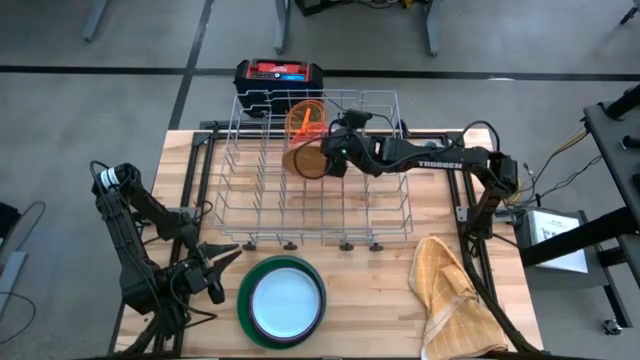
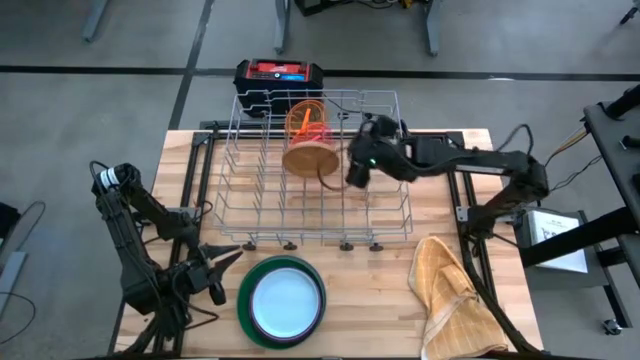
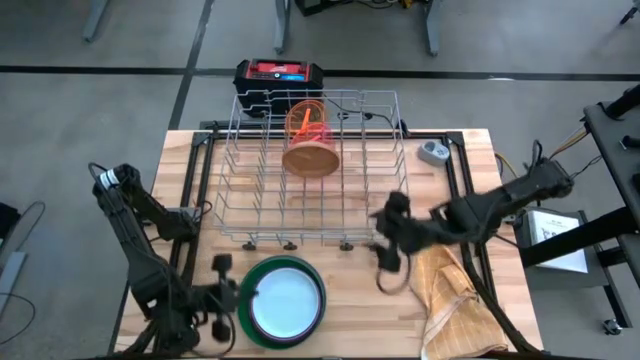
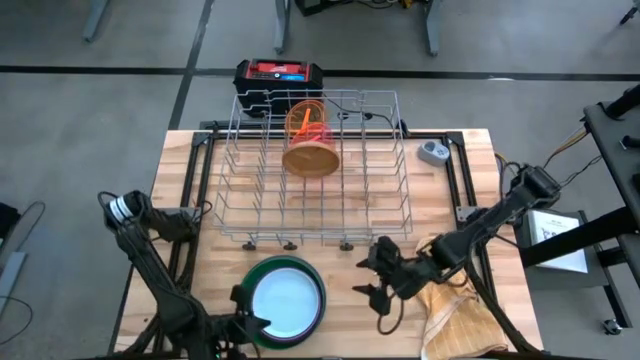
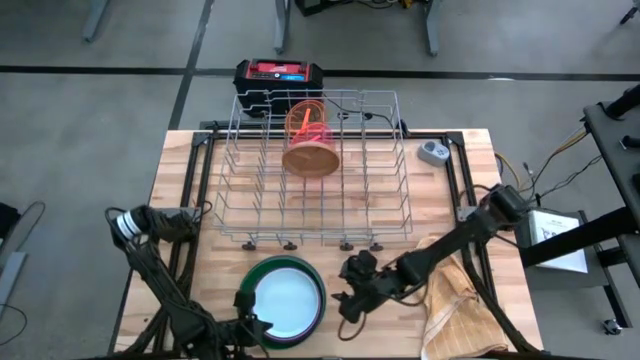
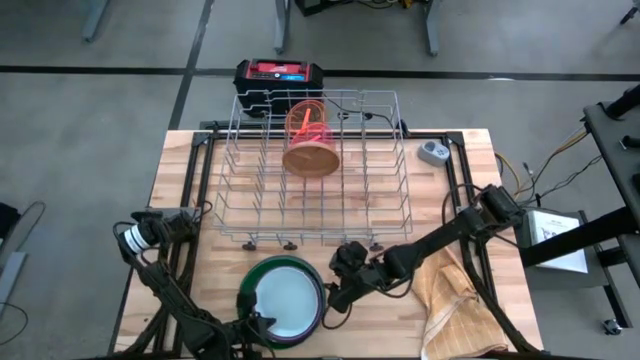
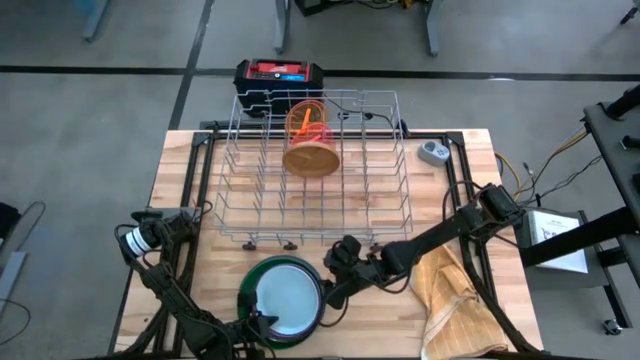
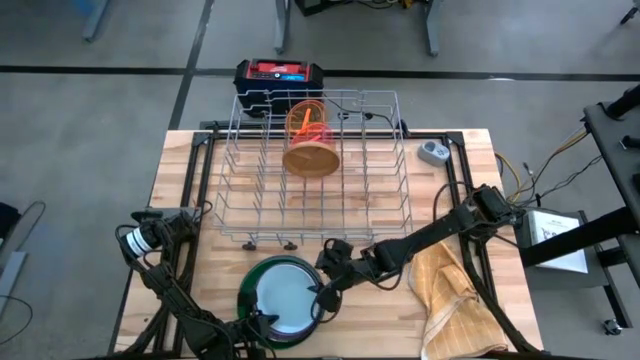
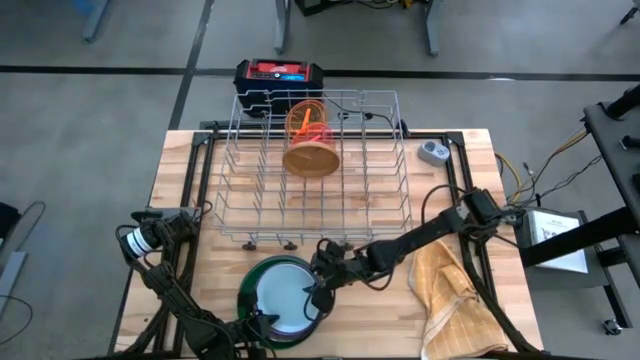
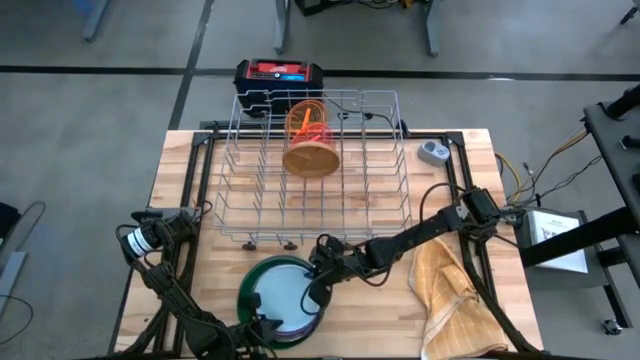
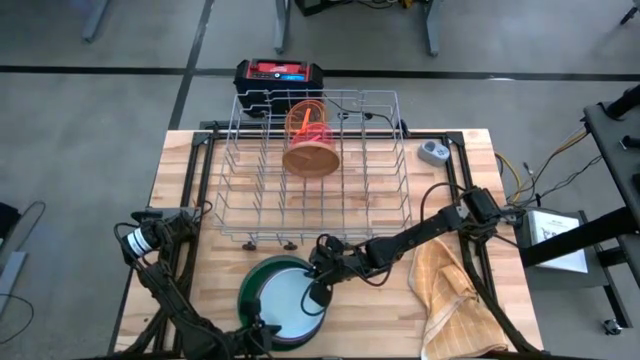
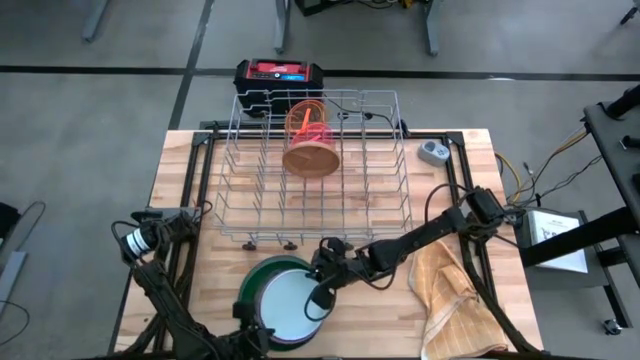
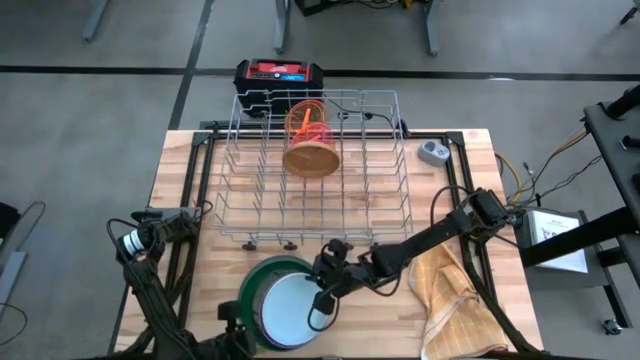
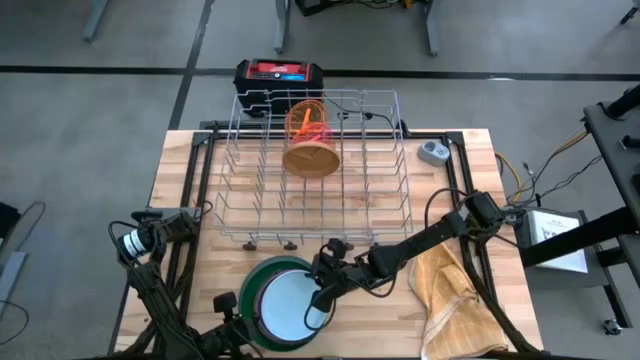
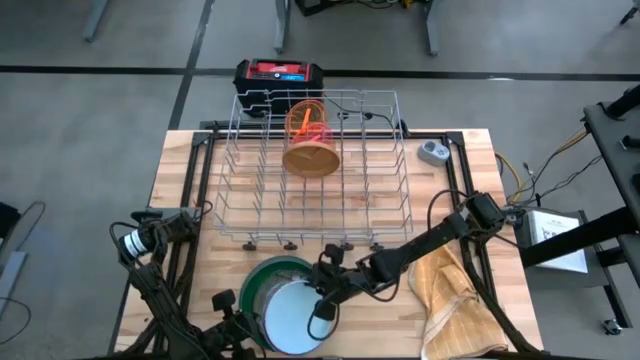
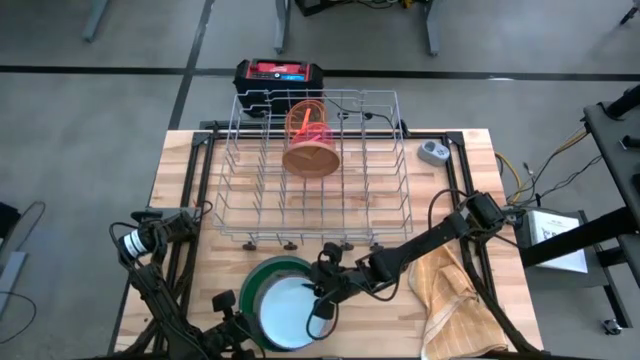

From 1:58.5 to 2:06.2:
Task: Sort dishes
Put the white plate into the dish rack

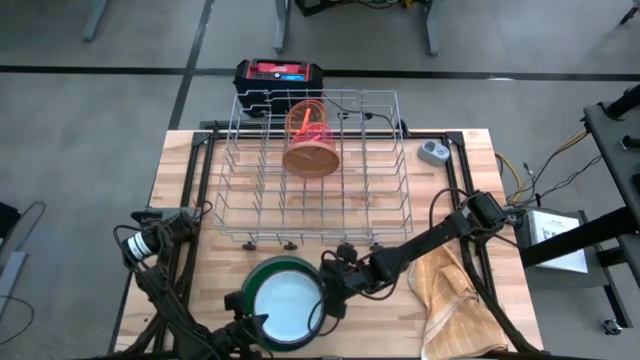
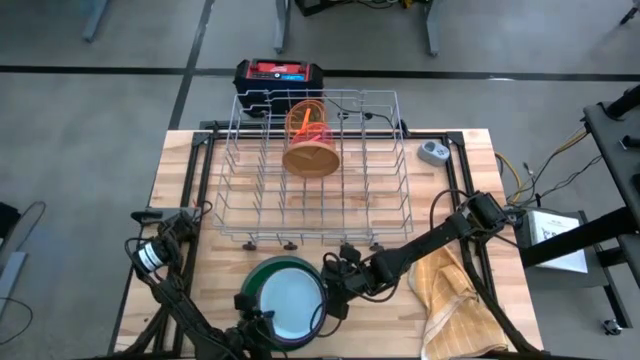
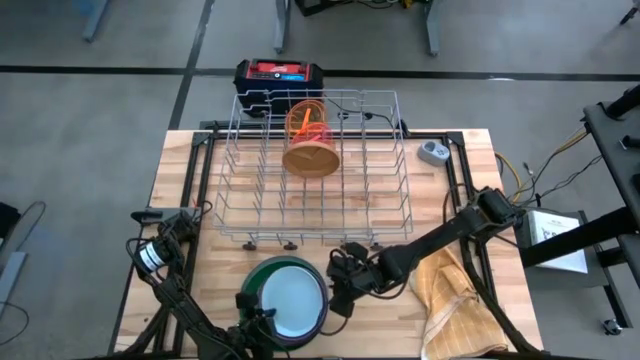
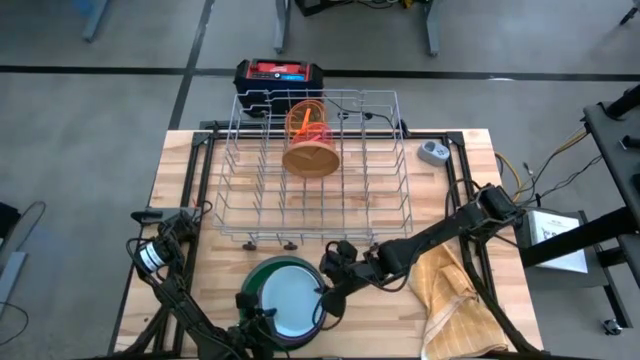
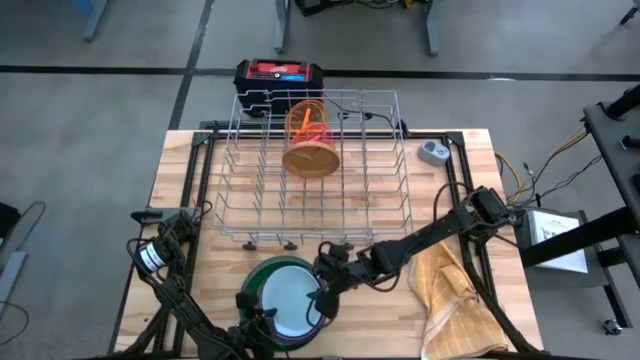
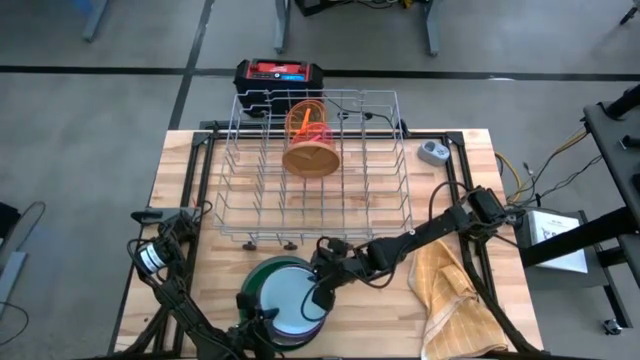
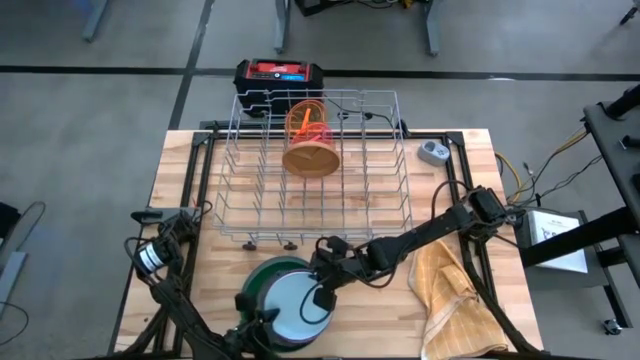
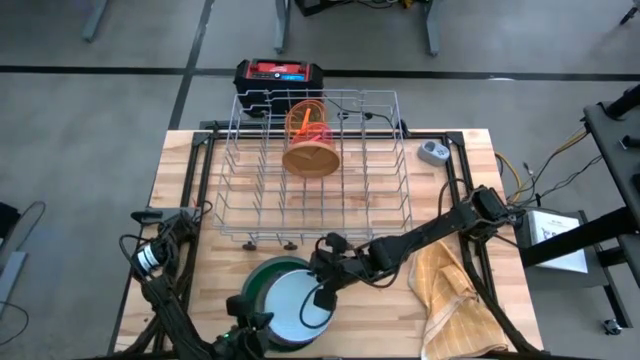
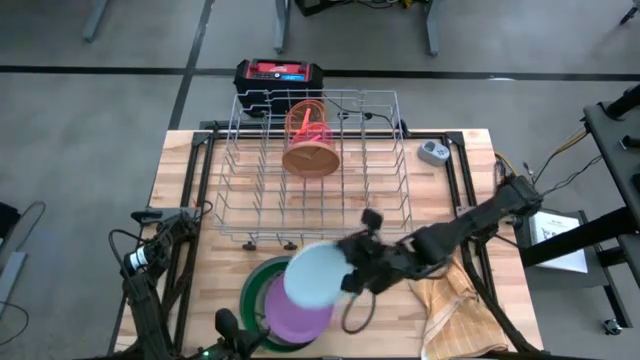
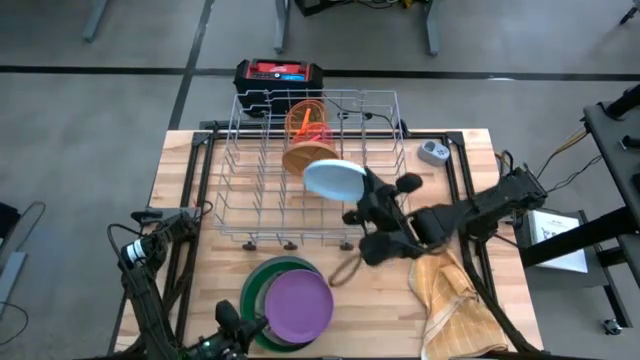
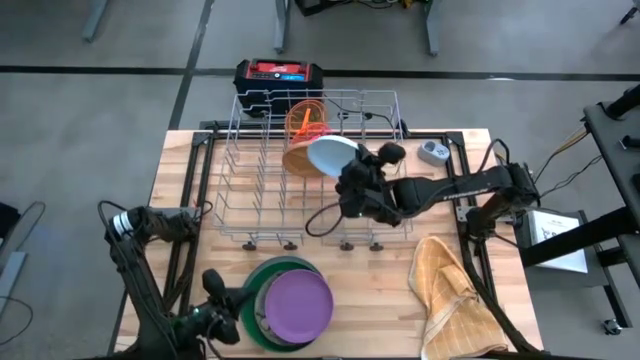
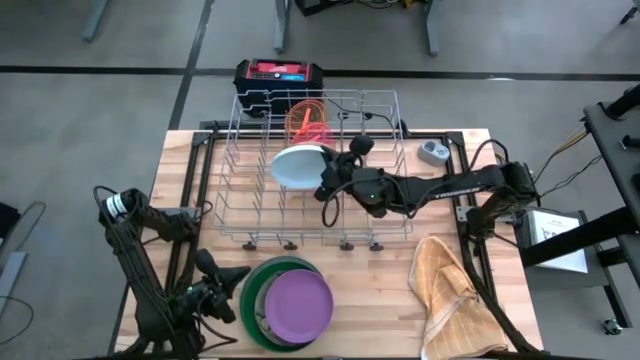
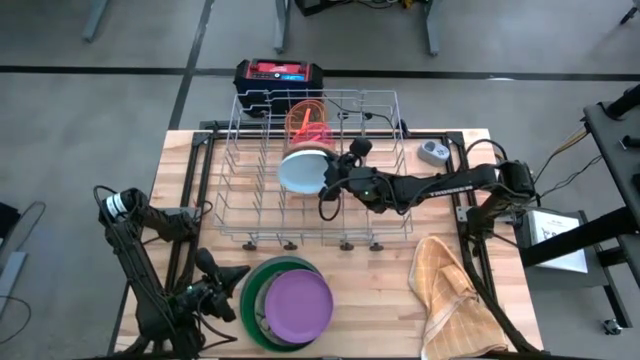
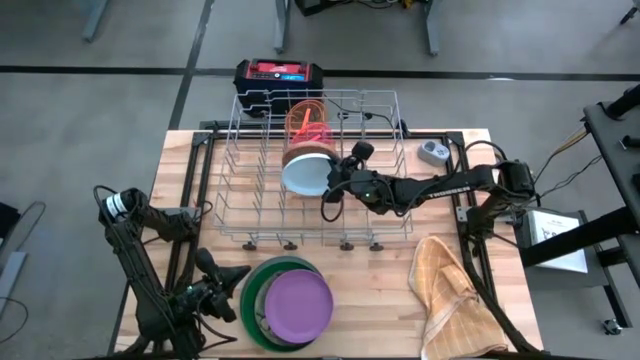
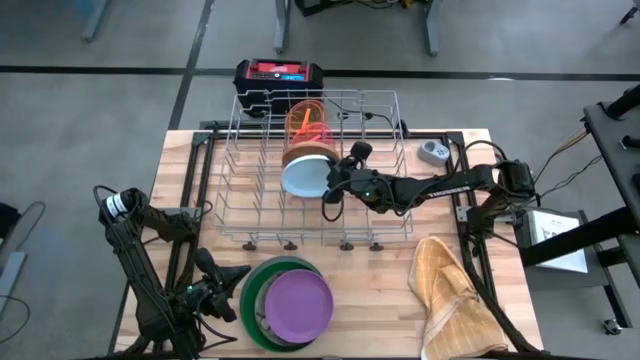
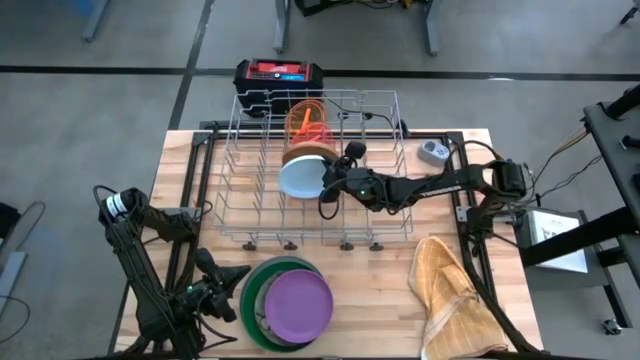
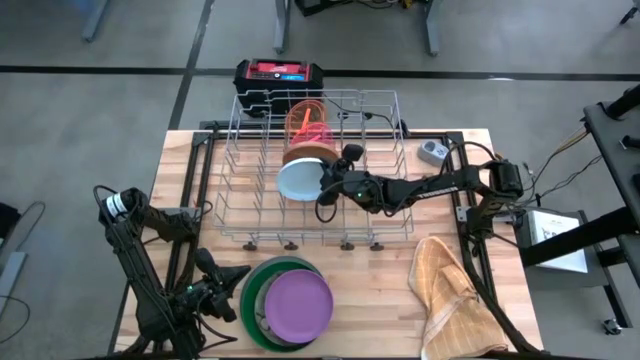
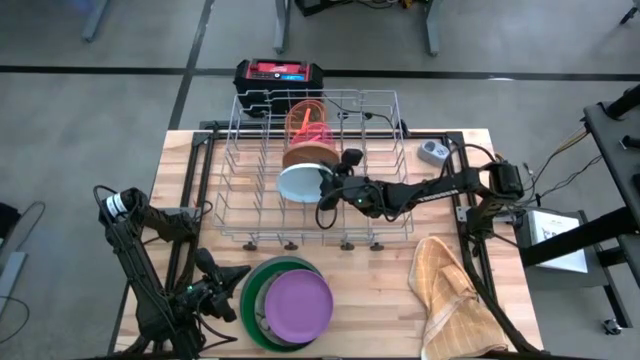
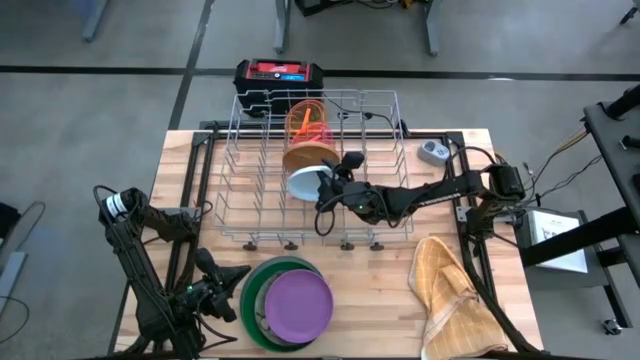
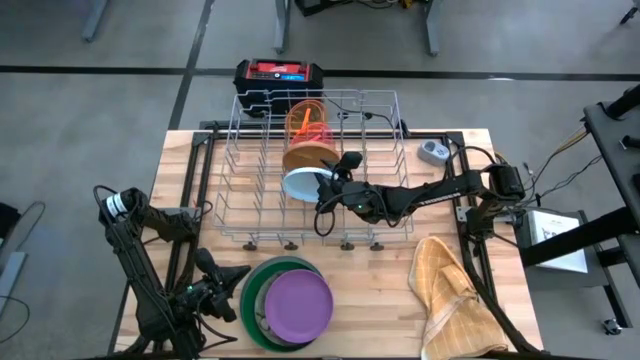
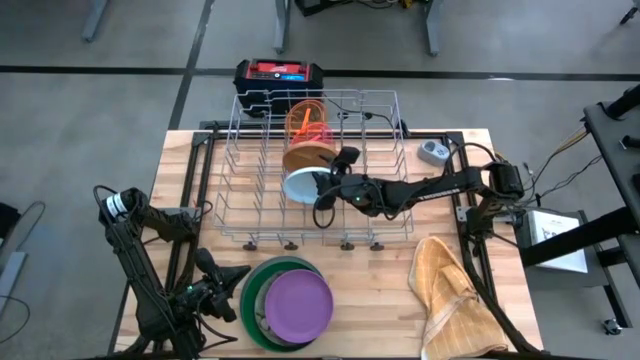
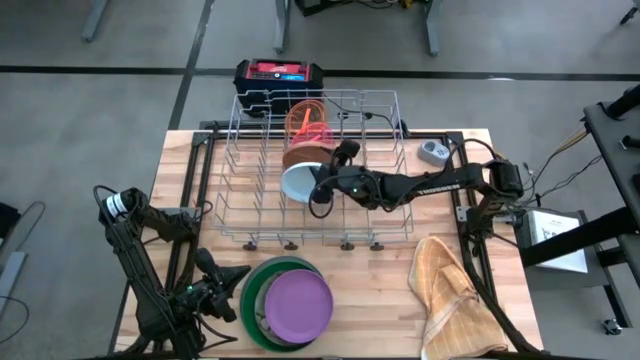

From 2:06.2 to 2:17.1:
Put the white plate into the dish rack
